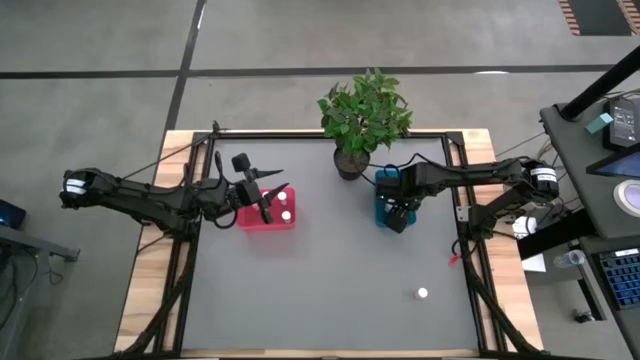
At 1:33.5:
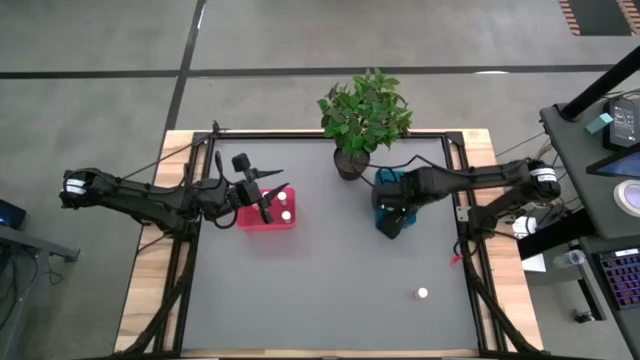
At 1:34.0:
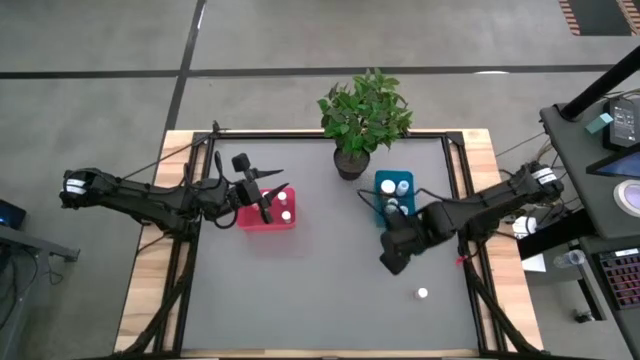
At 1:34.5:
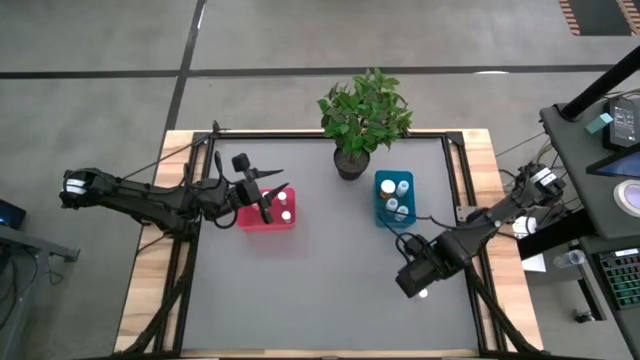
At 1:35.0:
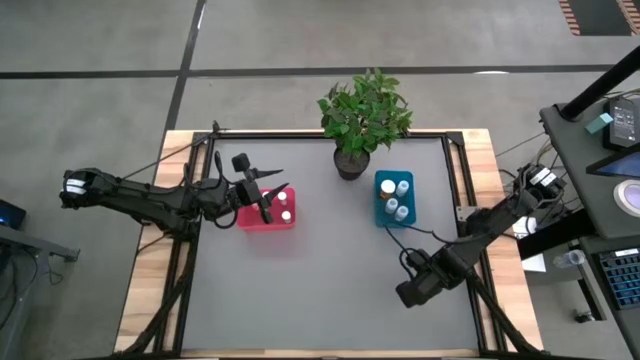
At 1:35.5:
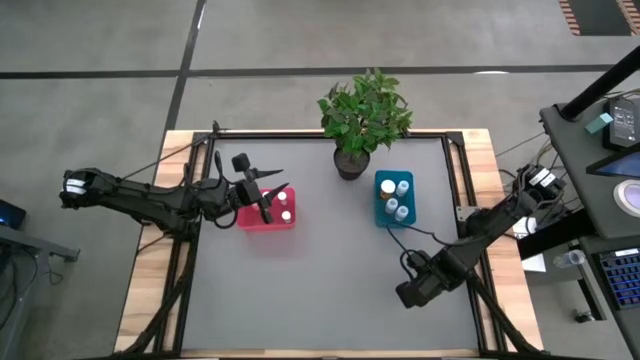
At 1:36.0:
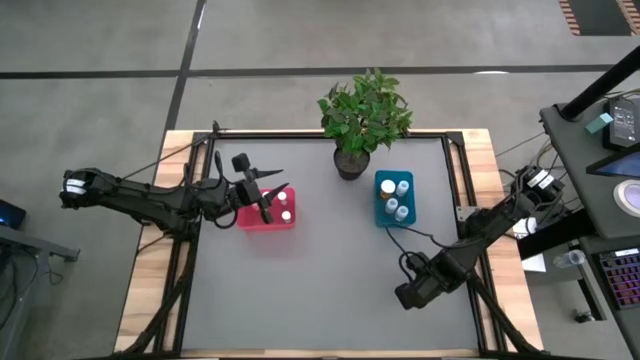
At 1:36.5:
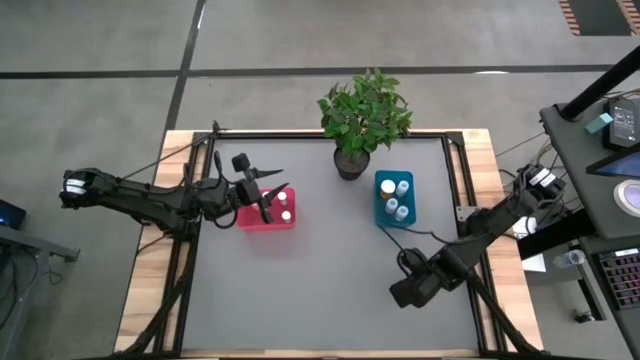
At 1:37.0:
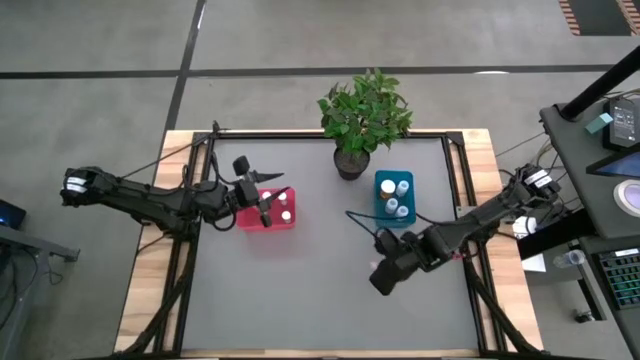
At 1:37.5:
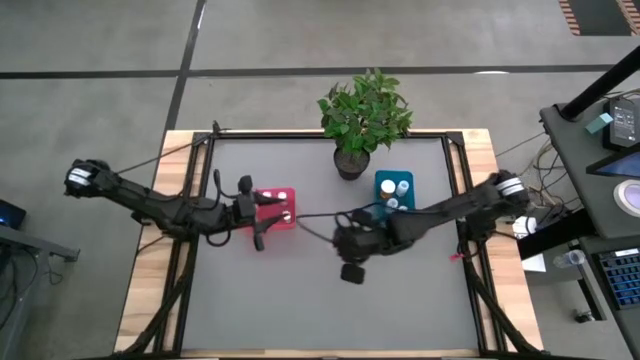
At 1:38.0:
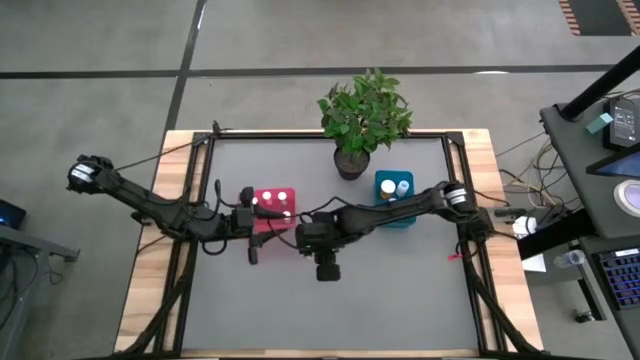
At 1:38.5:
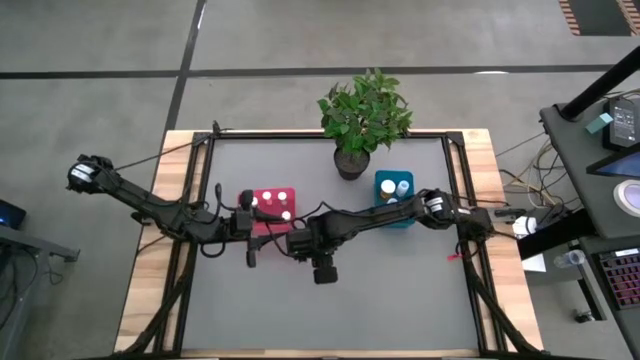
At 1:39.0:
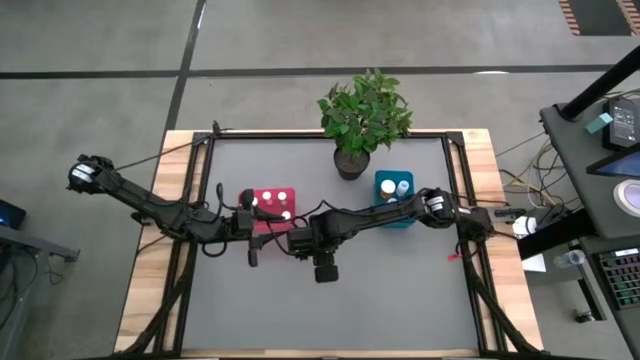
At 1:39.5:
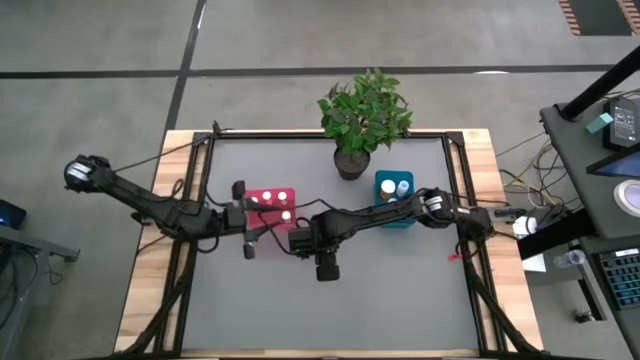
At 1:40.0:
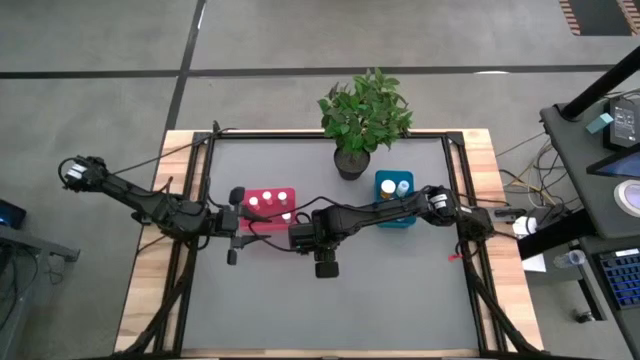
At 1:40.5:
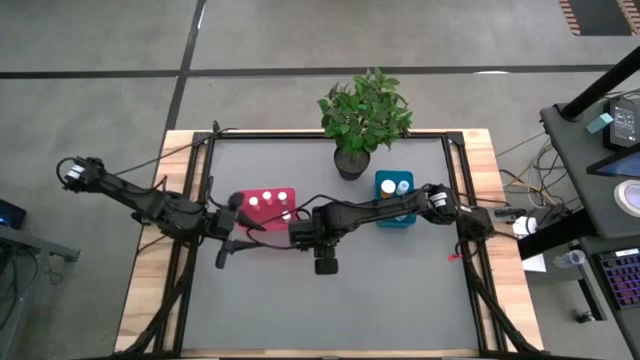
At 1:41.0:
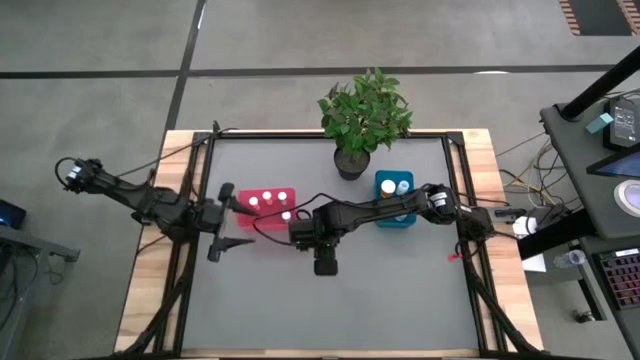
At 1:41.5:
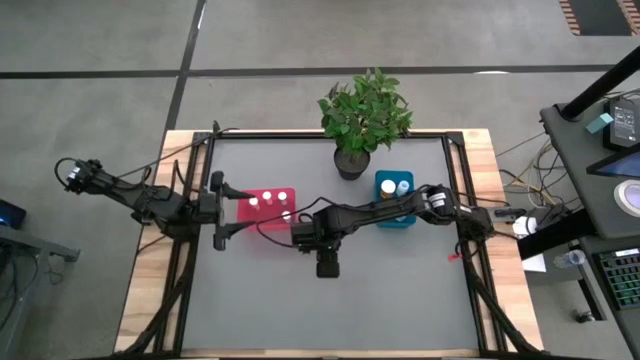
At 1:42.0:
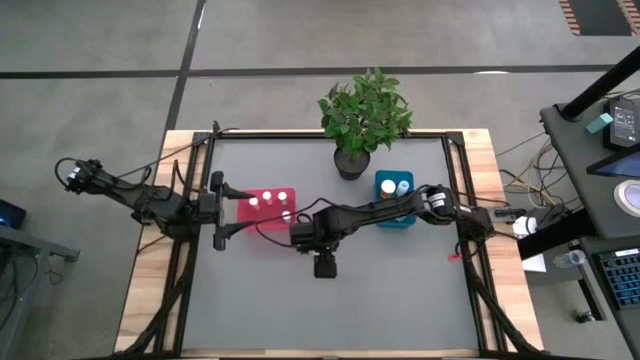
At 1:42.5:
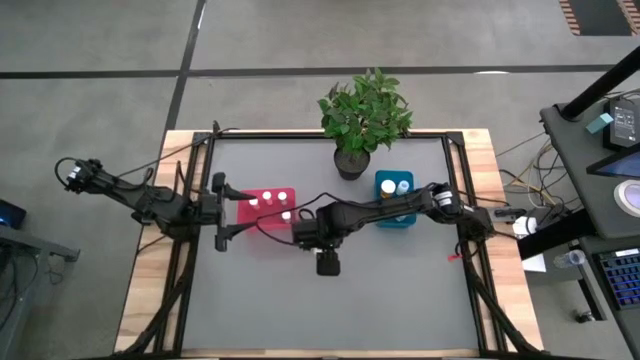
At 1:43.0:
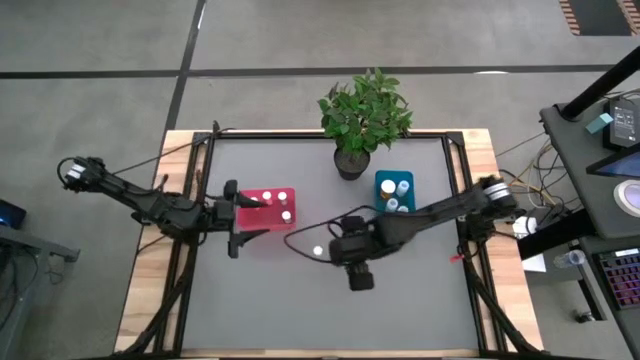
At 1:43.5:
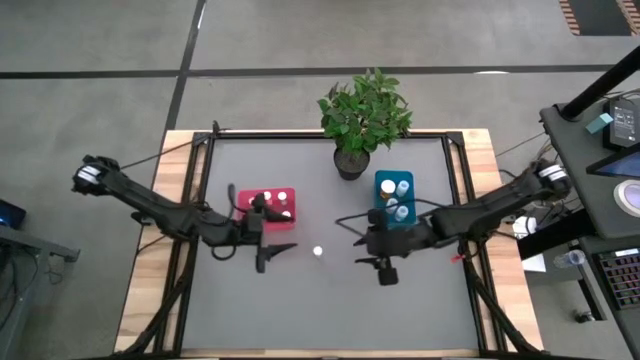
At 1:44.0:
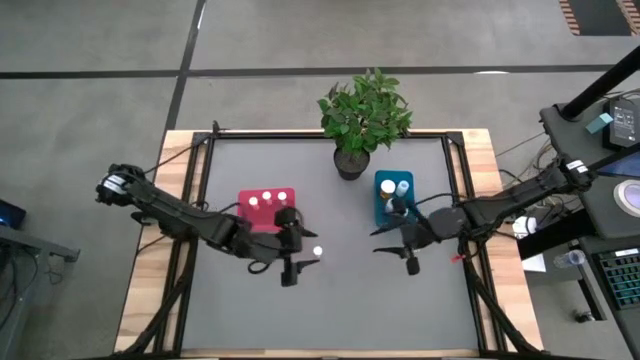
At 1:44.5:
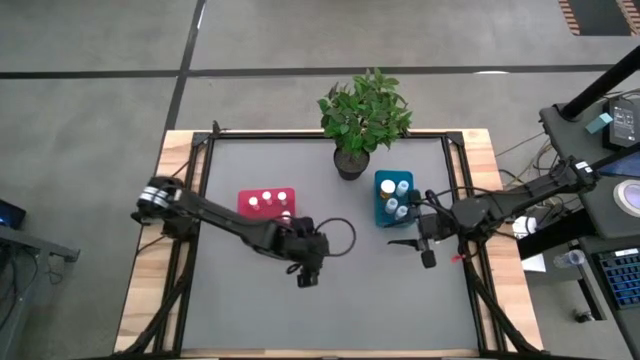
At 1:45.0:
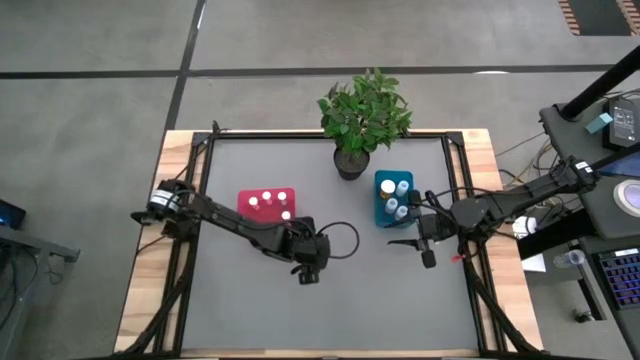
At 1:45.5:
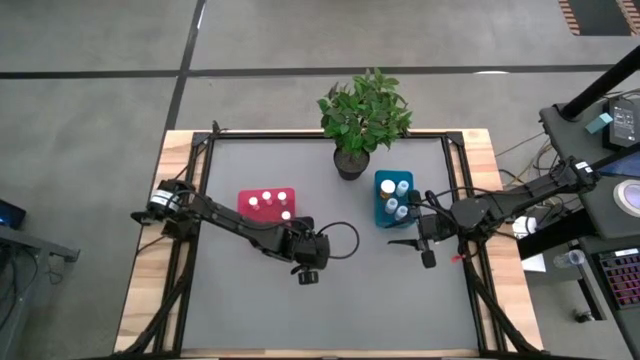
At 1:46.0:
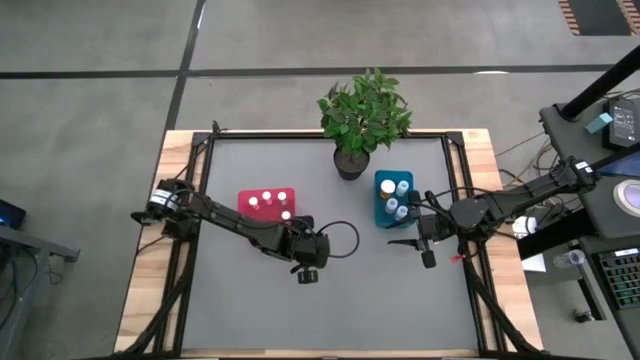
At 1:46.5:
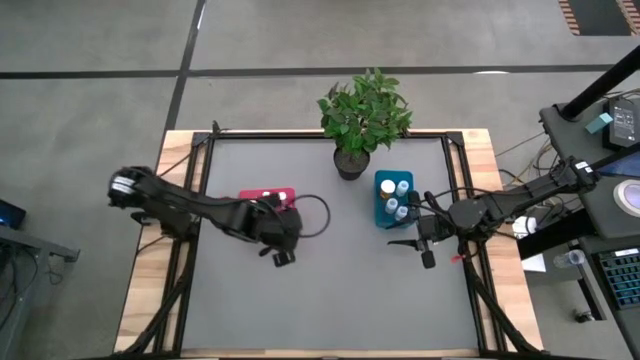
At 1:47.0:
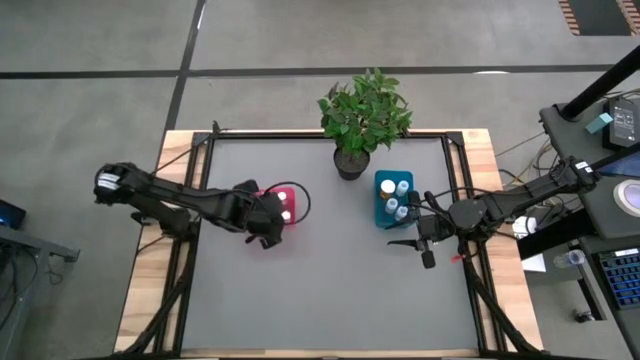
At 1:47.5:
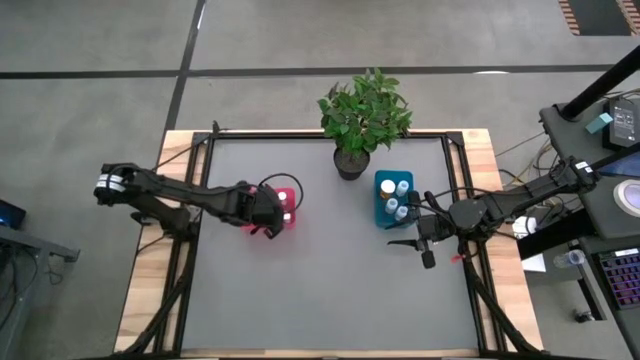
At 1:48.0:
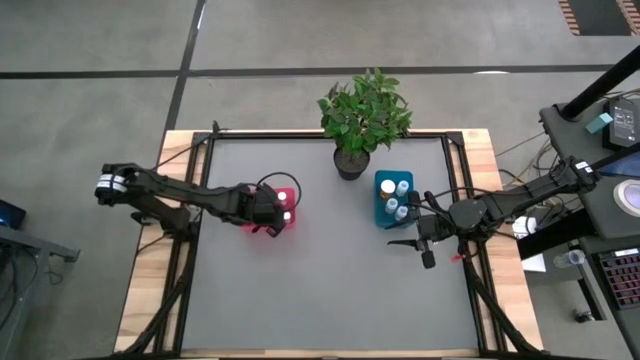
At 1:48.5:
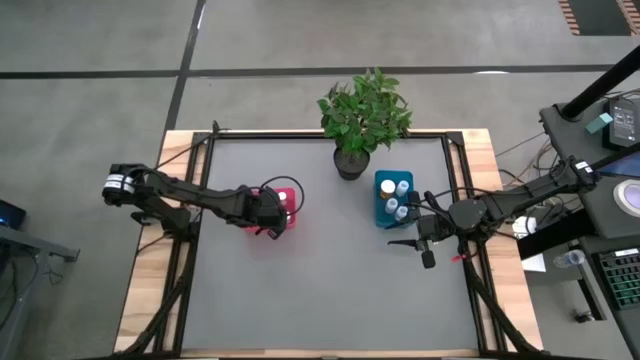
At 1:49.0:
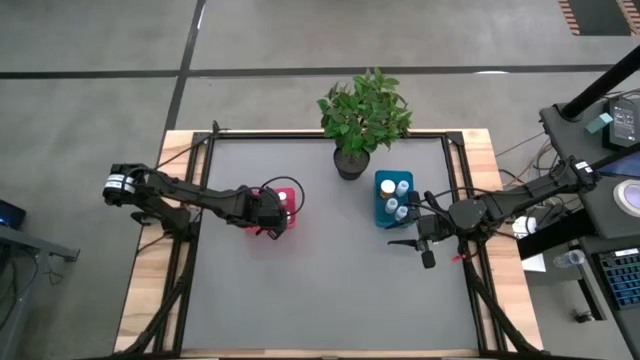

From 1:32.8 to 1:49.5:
Task: Pick and place medicine bottles into bin by pill shape (circle, oval)
Put the small pink pill bottle into the pink bin

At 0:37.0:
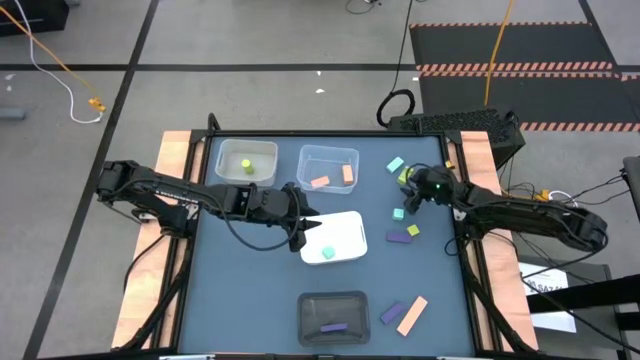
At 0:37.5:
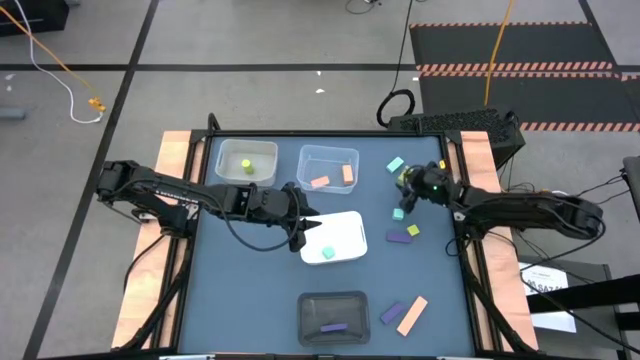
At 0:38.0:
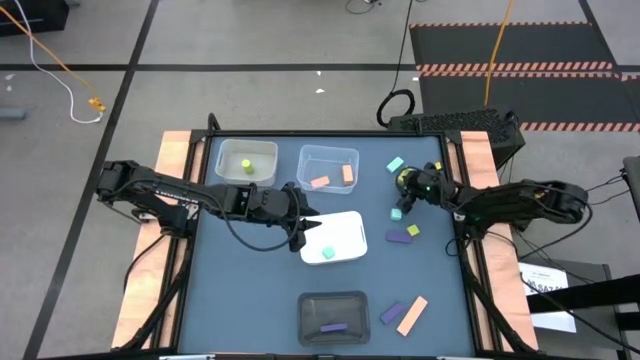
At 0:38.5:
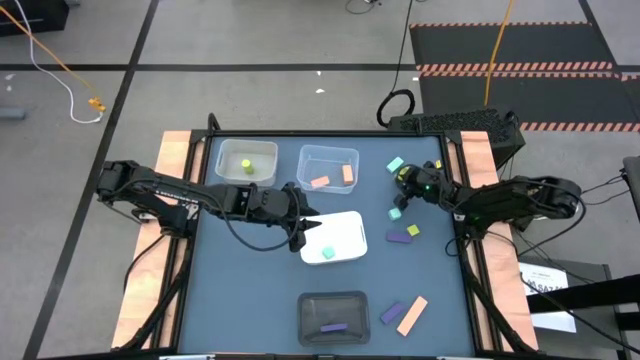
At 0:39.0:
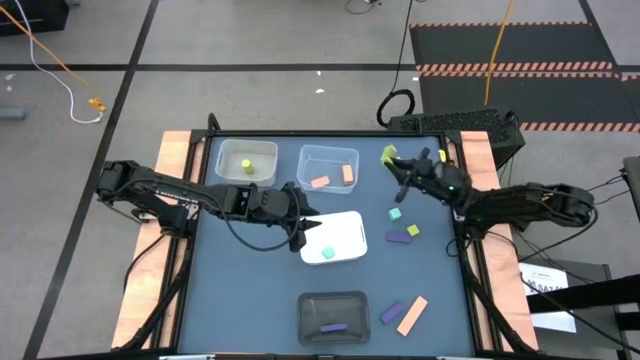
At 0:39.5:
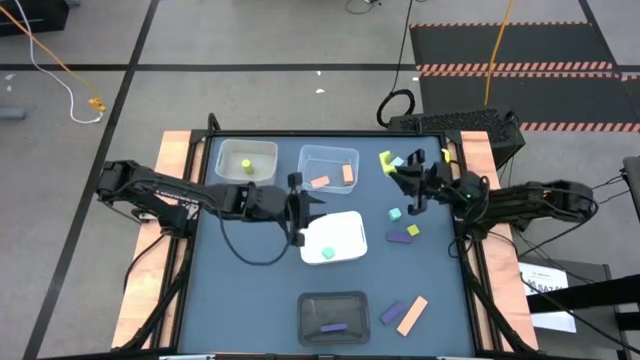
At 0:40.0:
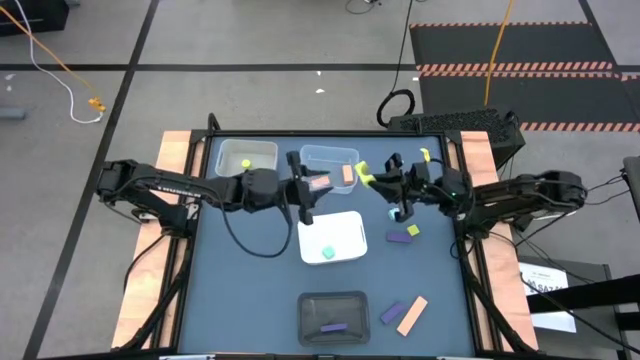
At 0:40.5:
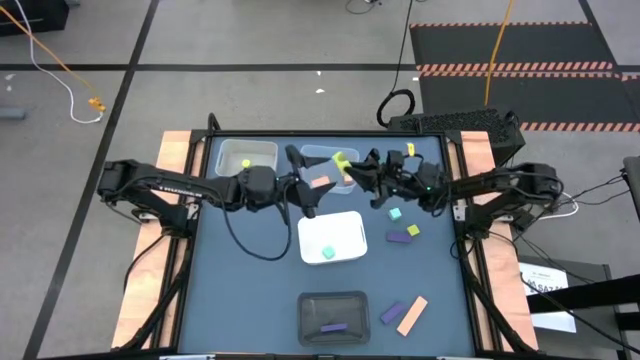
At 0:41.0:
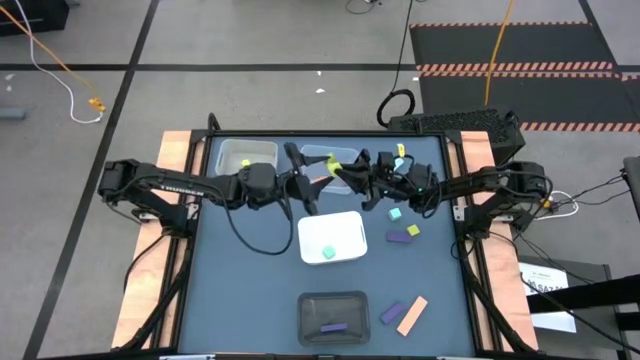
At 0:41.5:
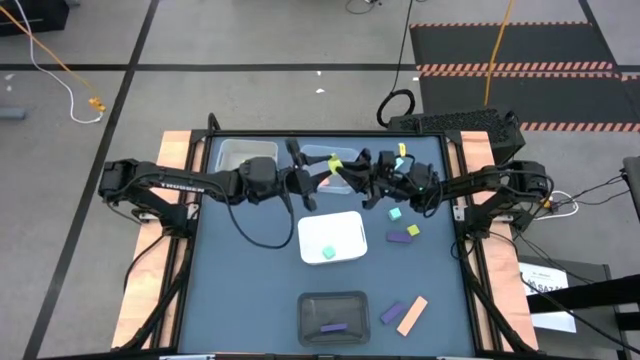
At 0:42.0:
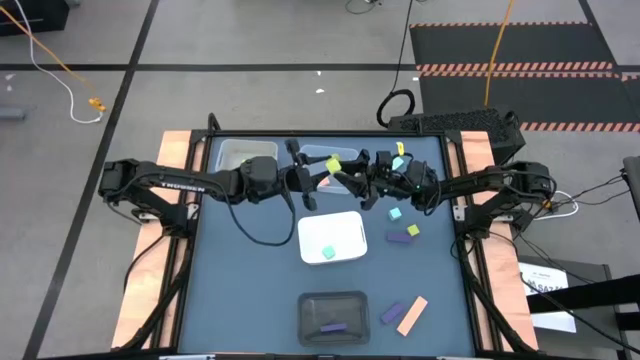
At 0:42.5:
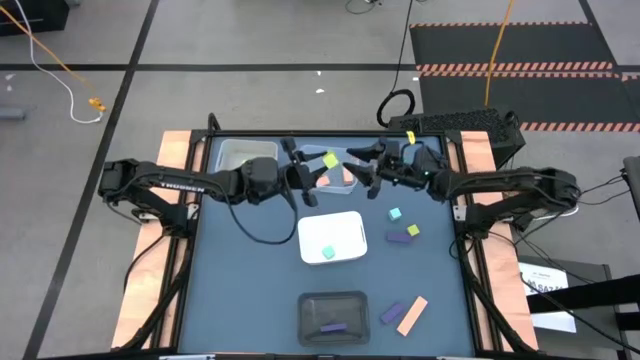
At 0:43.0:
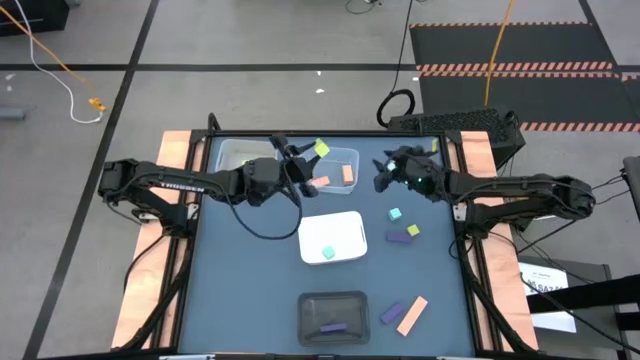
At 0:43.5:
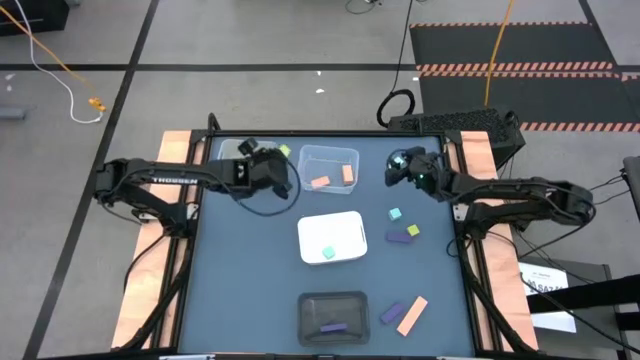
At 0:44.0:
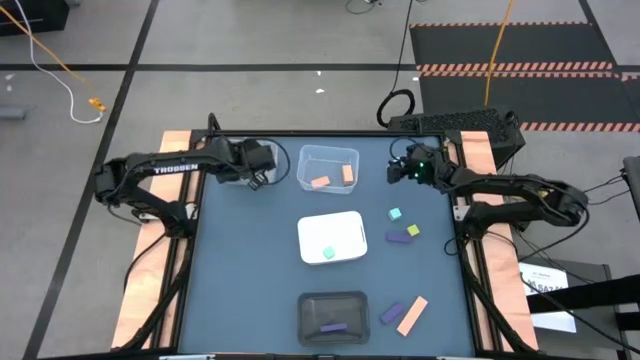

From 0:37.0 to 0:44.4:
Task: Sort & place blocks by color
Put the top light green block into the gray bin
